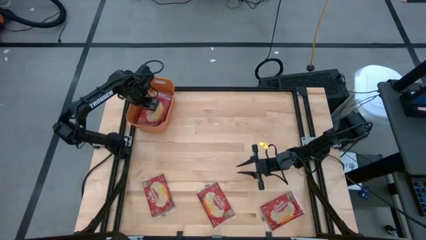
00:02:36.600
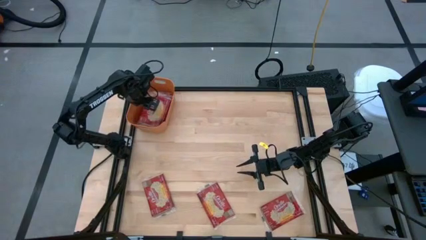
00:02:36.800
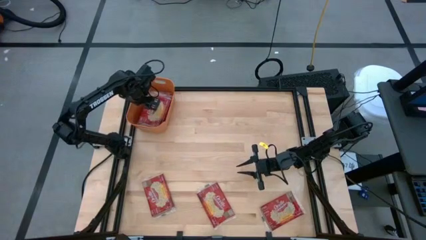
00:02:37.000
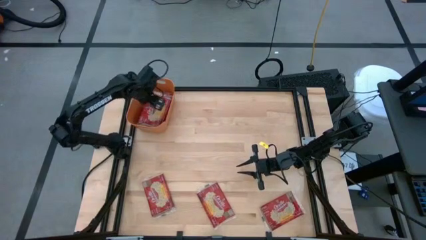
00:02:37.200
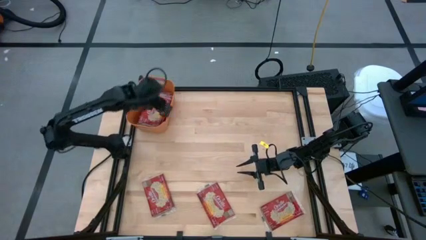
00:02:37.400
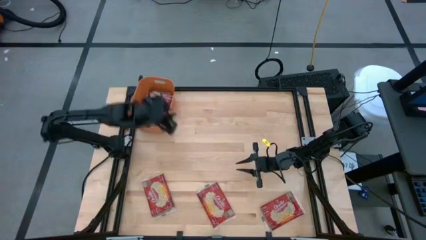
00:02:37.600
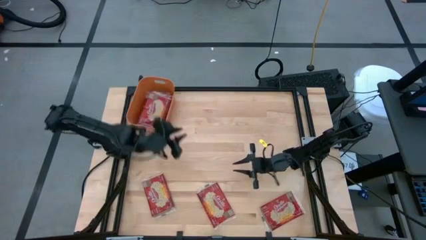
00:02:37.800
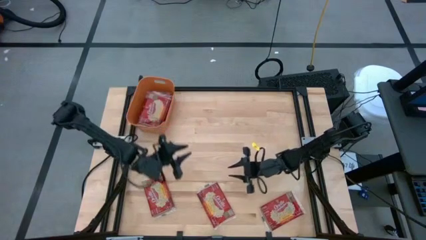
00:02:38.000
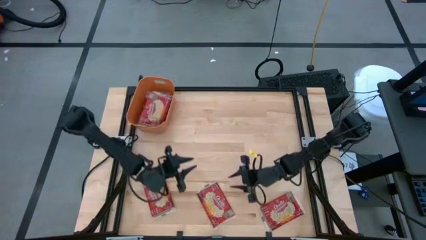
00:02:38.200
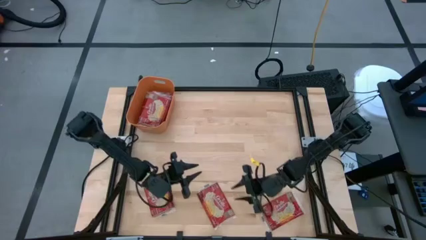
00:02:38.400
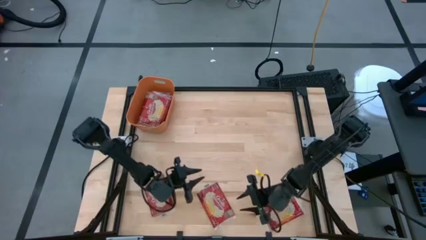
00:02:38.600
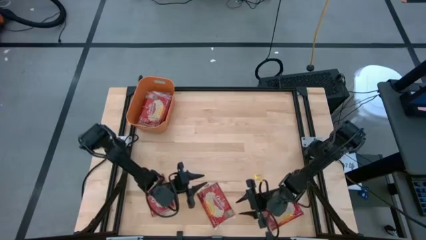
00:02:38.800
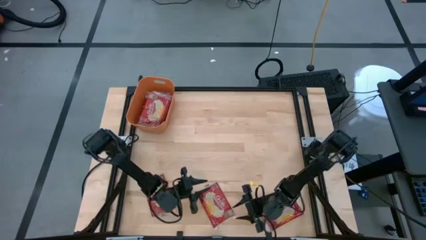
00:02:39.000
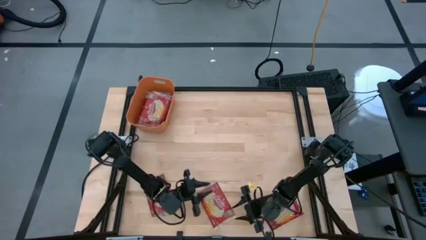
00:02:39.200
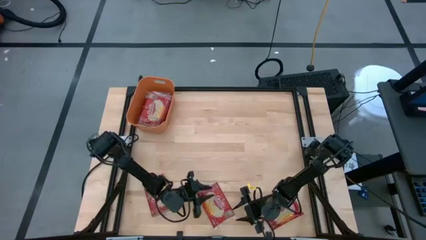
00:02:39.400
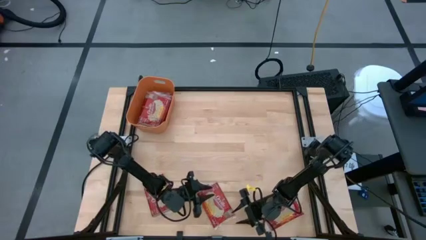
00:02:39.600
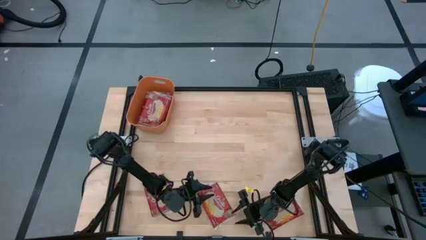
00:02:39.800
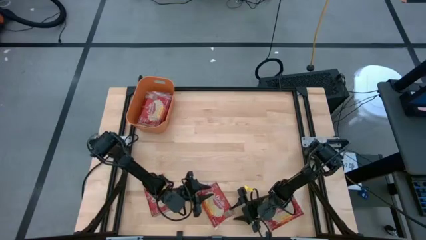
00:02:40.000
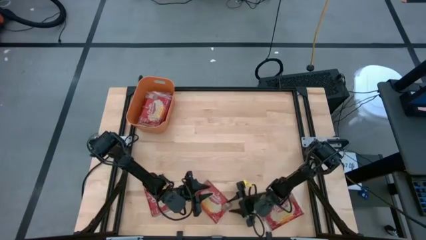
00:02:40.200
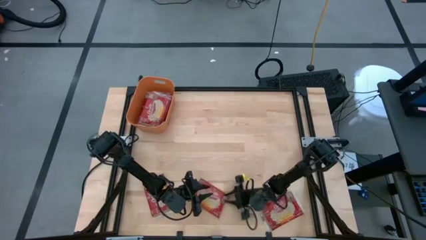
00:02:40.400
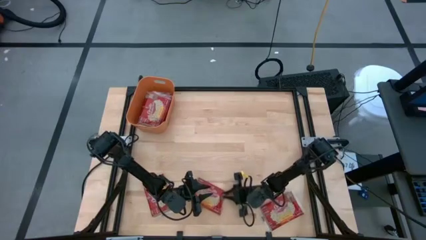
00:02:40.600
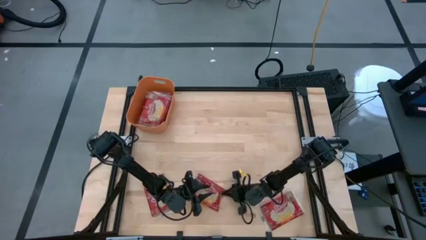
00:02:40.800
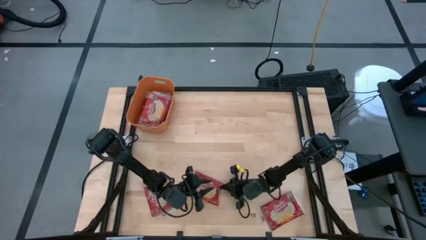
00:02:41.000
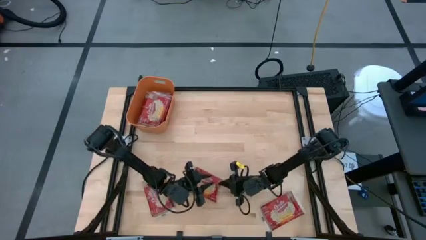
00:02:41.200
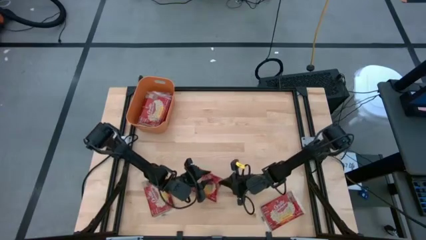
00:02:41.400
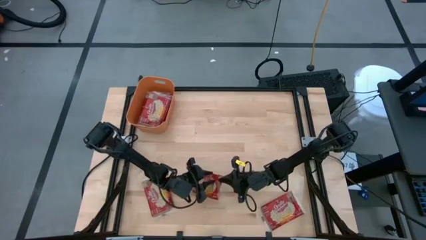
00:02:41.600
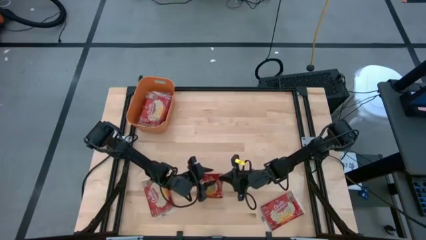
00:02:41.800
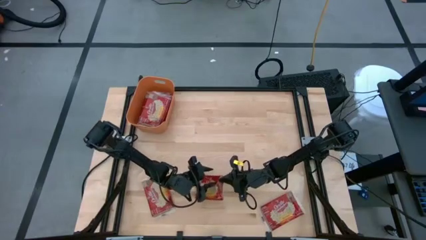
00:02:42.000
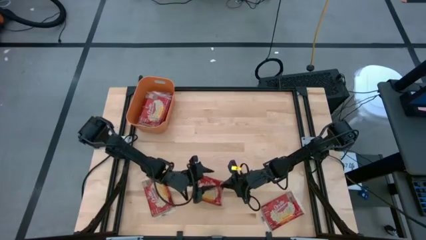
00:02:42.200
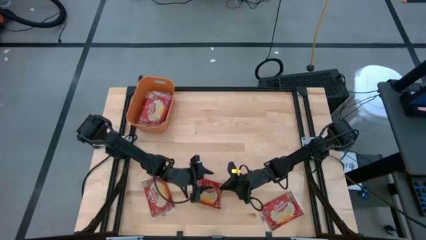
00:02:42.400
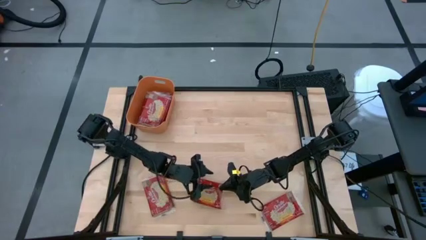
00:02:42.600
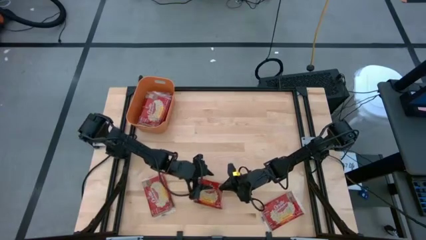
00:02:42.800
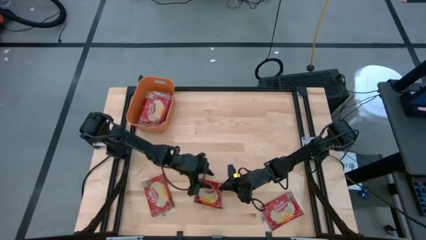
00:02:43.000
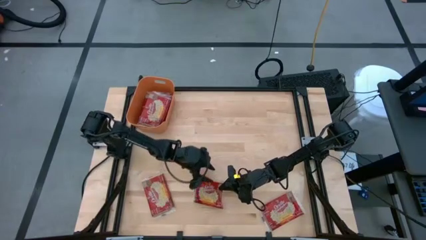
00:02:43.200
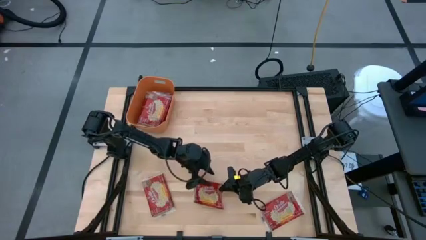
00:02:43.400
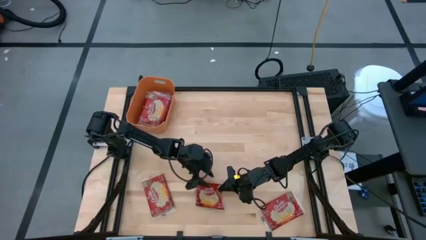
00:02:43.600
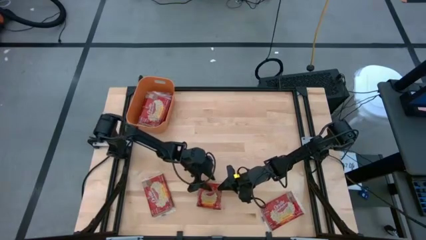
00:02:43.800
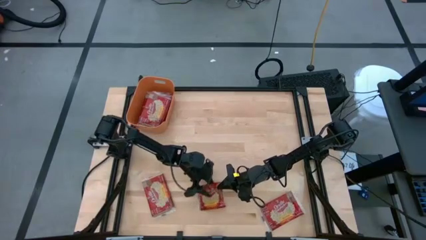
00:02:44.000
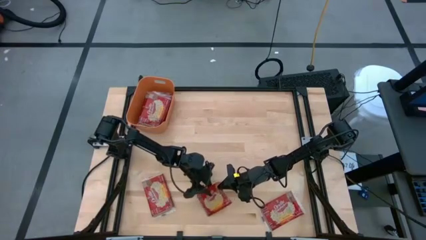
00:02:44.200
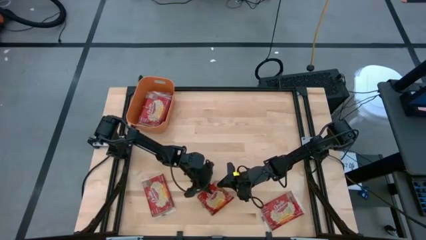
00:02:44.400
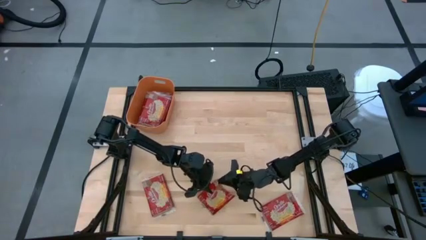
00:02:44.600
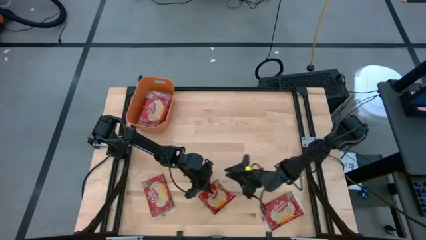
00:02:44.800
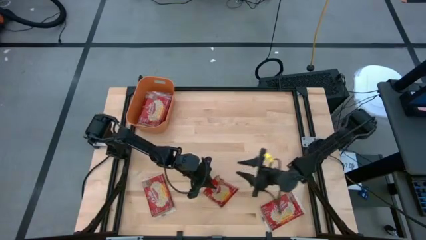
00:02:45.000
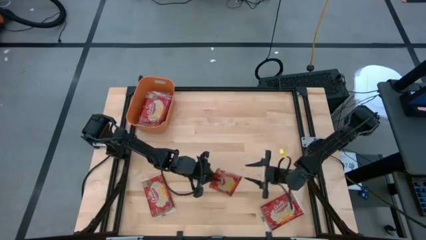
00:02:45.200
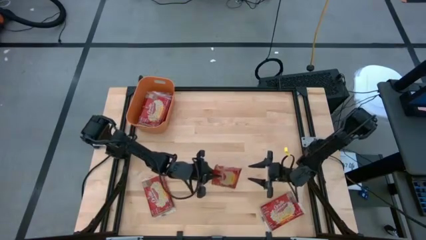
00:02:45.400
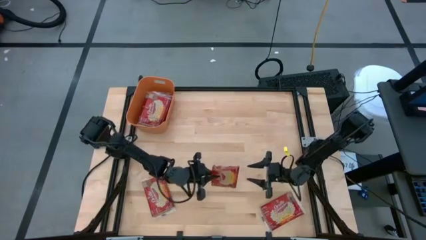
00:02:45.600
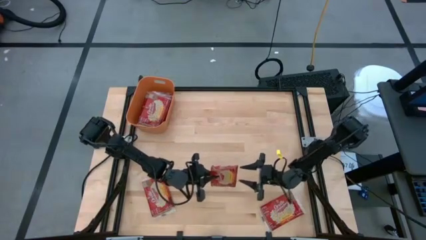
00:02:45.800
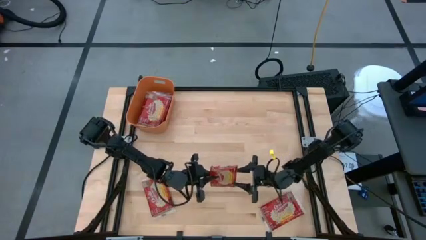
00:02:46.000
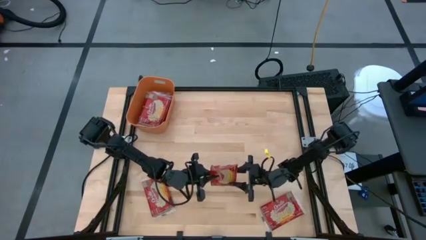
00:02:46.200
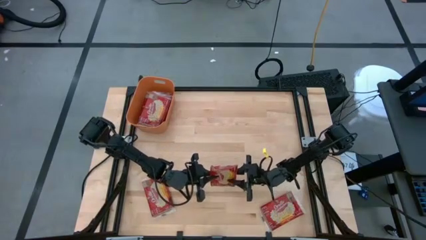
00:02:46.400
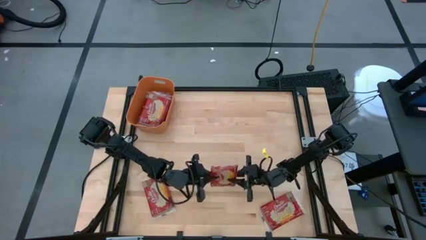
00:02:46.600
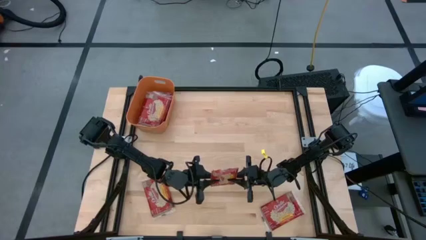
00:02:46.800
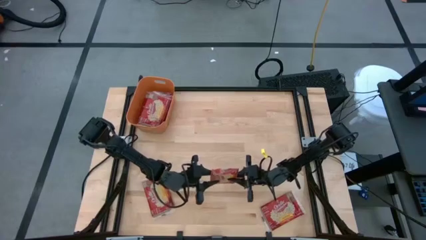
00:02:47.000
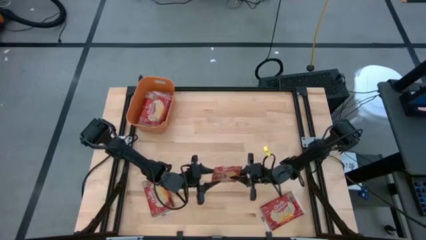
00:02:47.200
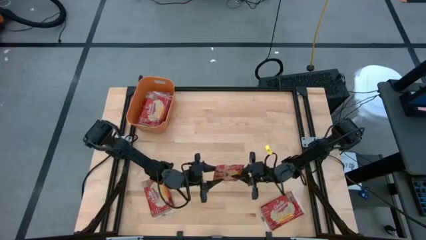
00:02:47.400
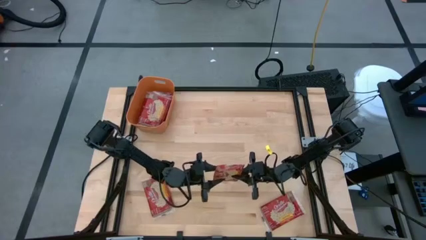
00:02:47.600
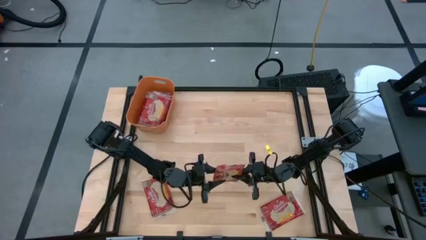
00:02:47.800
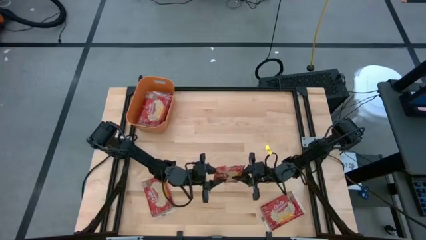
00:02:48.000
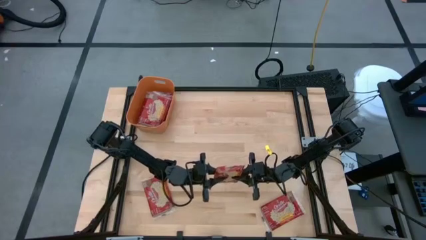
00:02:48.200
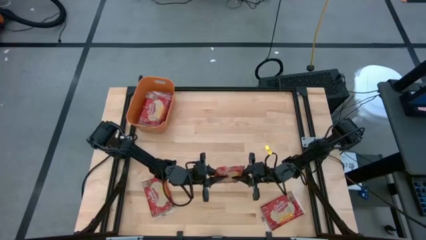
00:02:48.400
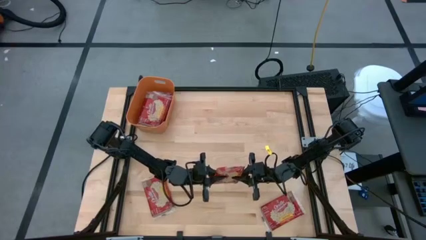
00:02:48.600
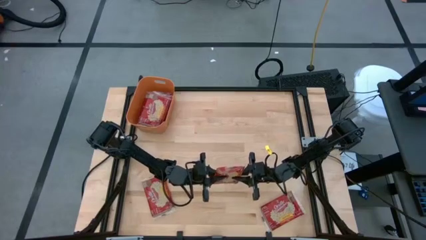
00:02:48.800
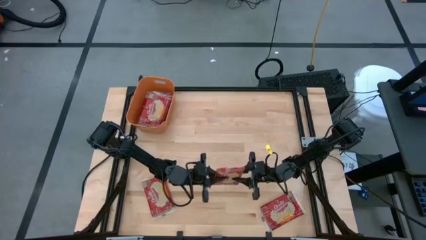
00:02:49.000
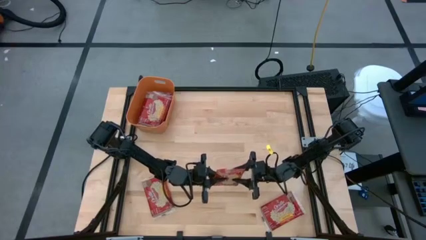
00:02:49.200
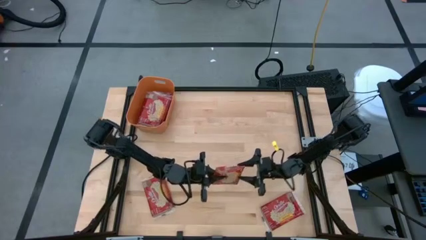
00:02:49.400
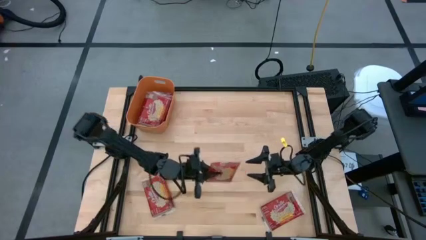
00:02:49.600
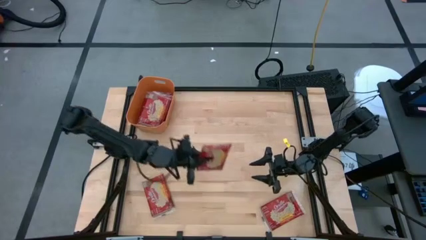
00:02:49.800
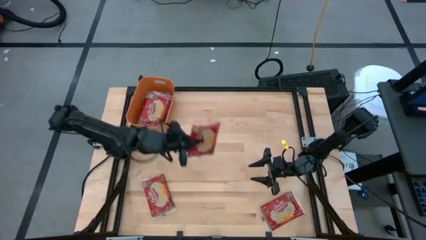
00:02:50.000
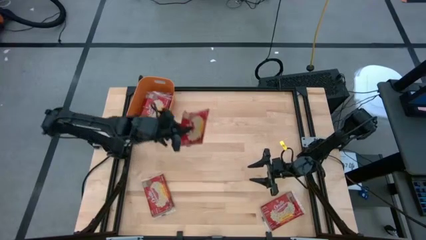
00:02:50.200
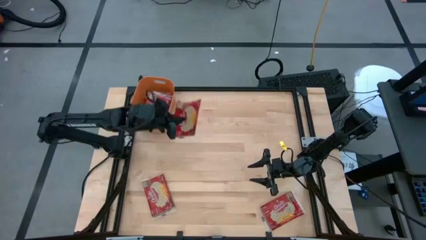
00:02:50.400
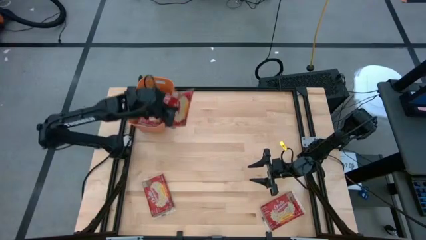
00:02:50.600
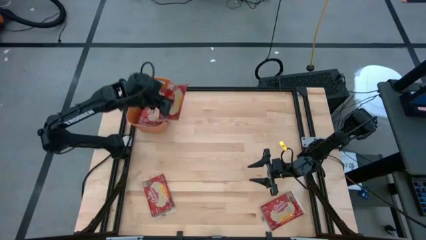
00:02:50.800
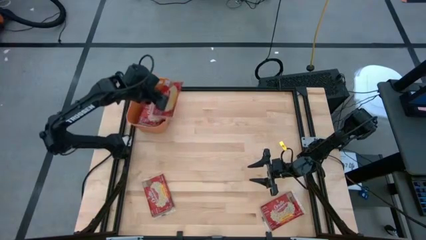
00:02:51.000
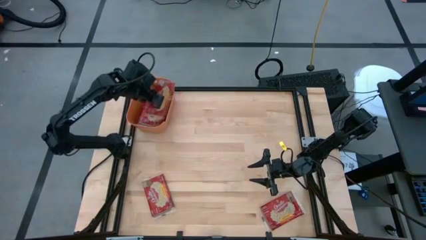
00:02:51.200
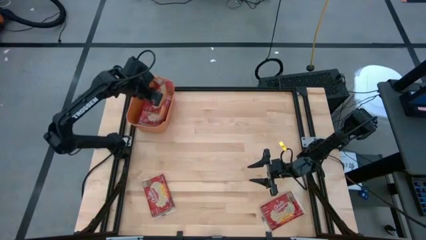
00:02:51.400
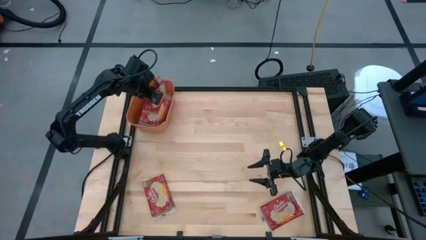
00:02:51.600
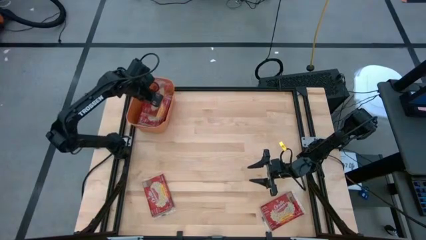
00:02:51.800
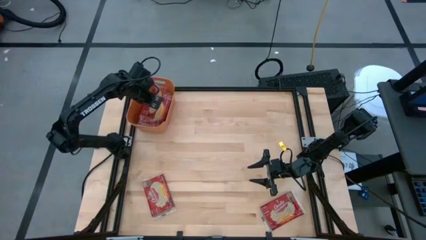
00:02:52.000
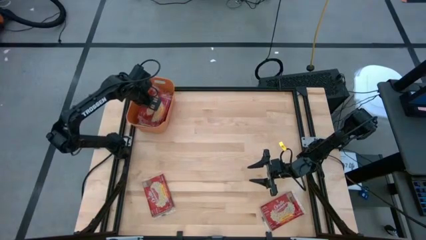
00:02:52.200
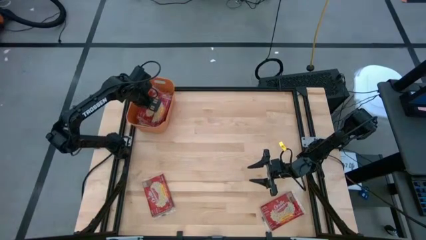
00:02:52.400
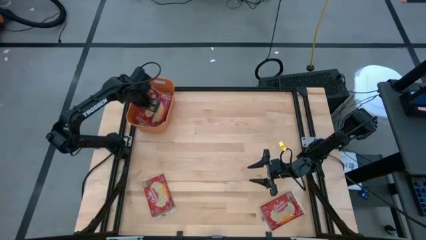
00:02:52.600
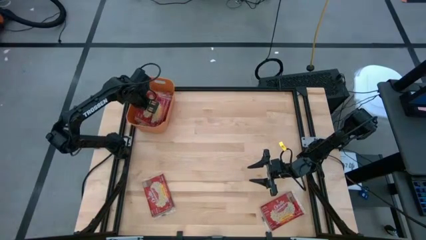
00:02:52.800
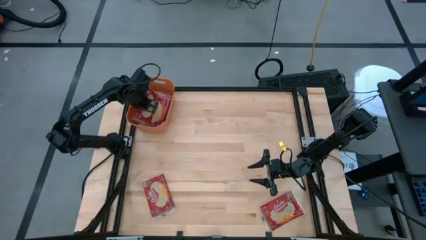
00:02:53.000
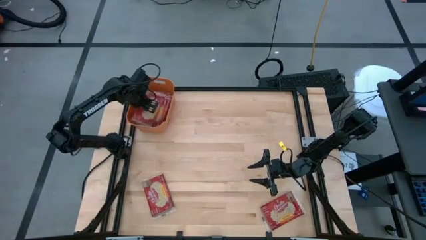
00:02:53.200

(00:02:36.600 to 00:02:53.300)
Task: Sort popcorn bags into baskets
Put the red popcorn bag into the orange bin

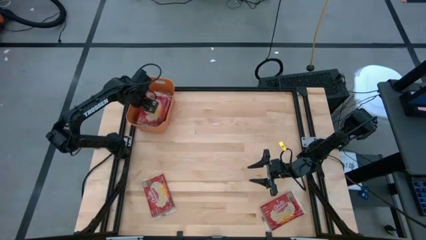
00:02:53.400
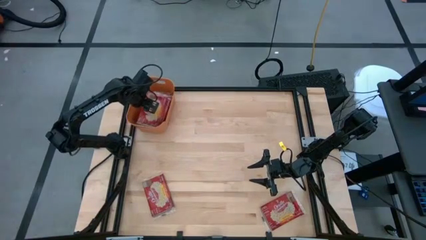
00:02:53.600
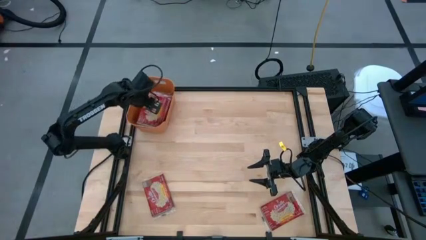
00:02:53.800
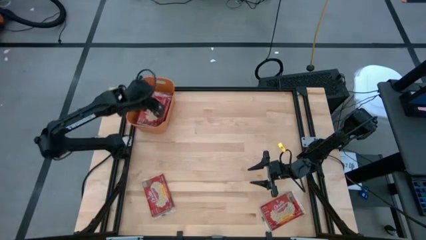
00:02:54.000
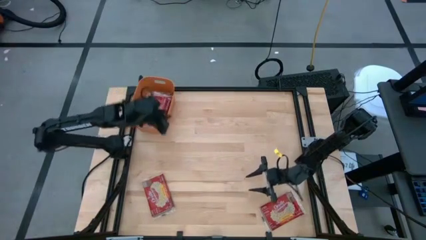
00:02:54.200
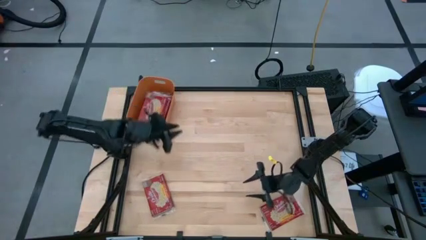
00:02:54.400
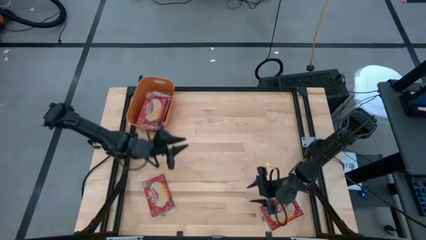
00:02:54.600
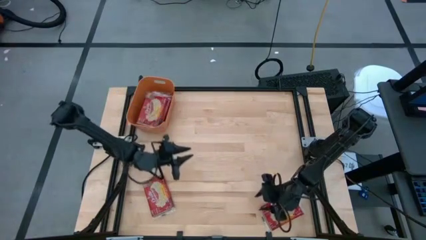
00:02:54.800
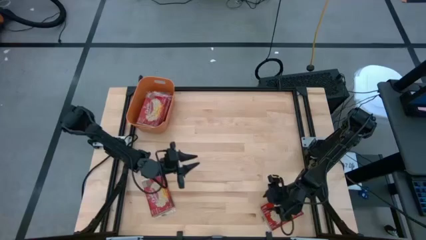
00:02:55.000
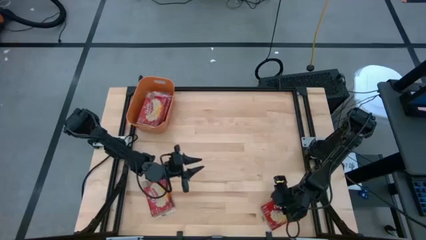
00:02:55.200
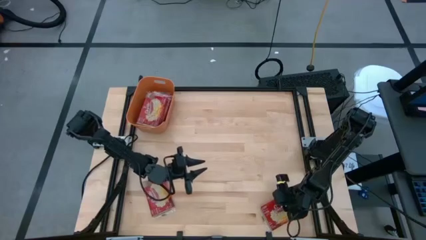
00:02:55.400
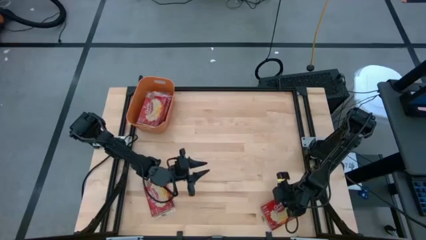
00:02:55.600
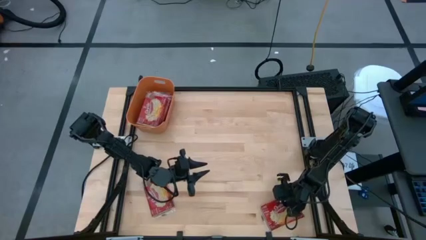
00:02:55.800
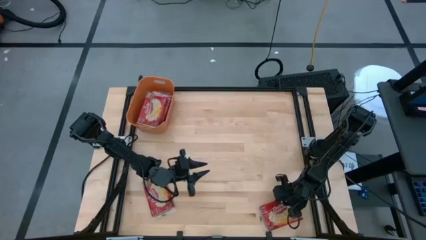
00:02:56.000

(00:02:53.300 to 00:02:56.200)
Put the red popcorn bag into the orange bin
